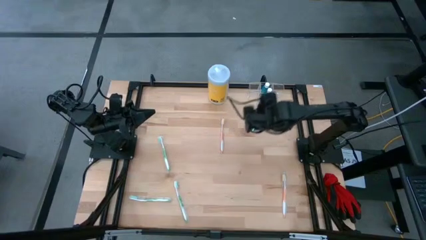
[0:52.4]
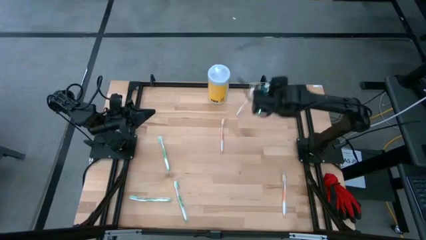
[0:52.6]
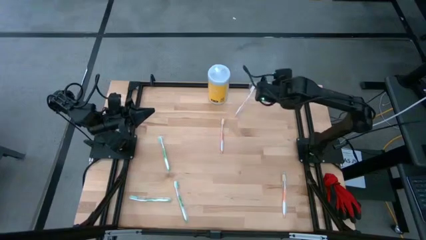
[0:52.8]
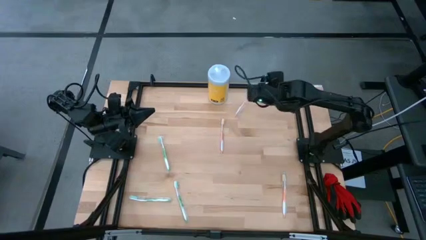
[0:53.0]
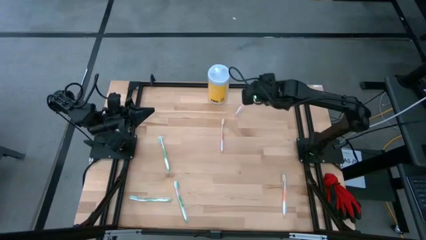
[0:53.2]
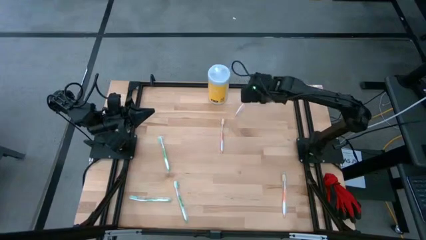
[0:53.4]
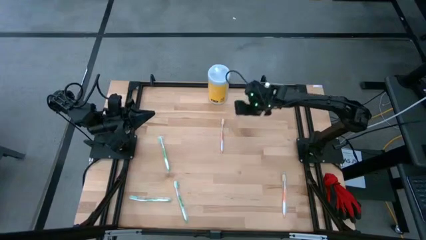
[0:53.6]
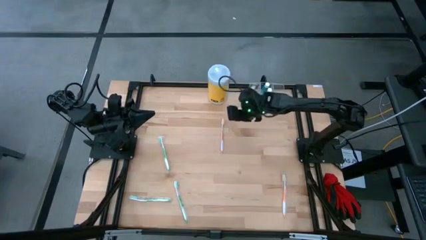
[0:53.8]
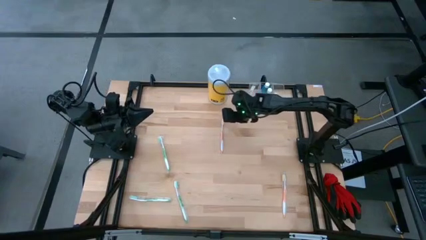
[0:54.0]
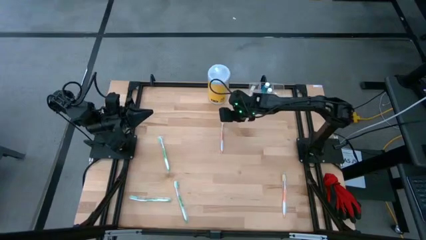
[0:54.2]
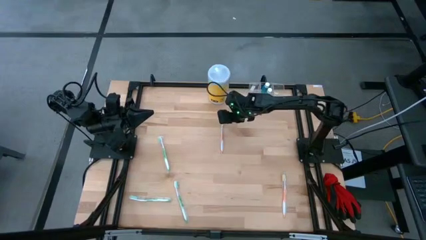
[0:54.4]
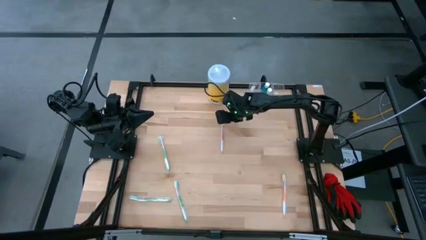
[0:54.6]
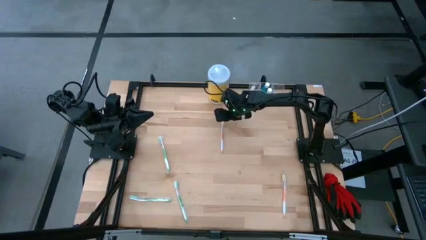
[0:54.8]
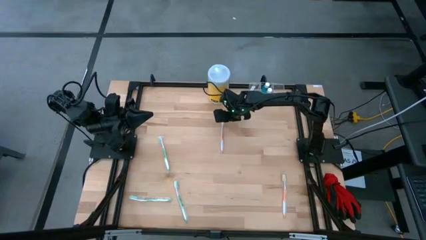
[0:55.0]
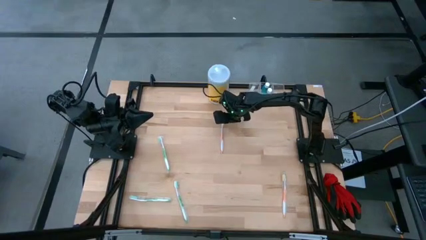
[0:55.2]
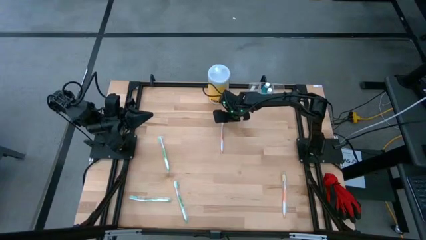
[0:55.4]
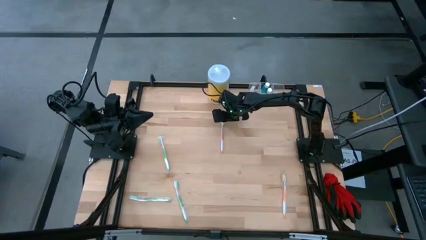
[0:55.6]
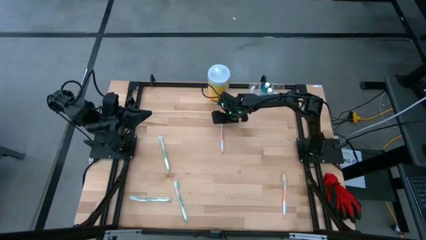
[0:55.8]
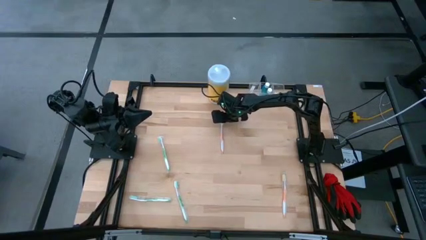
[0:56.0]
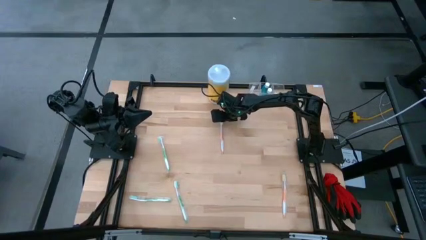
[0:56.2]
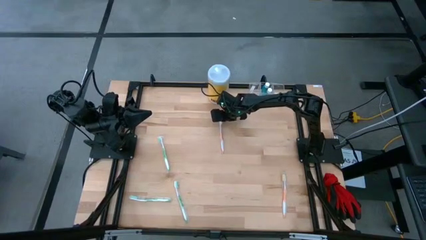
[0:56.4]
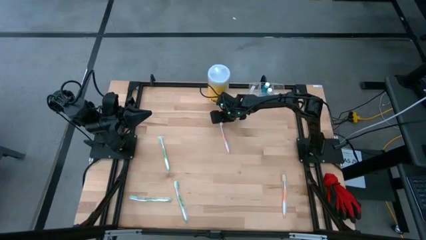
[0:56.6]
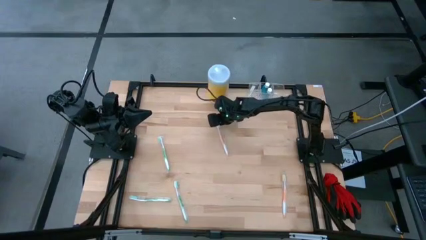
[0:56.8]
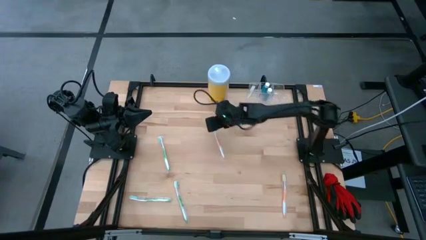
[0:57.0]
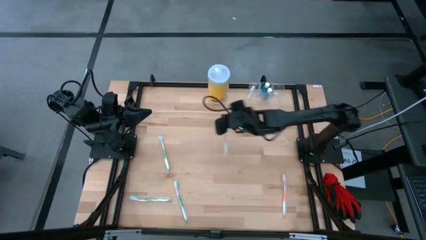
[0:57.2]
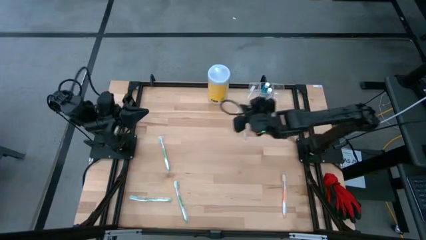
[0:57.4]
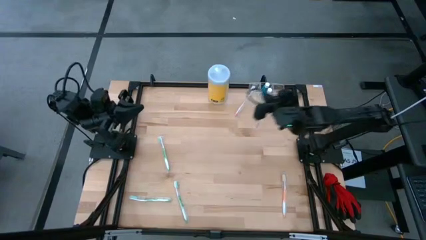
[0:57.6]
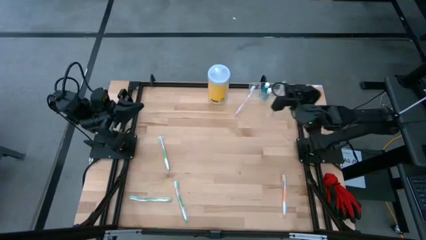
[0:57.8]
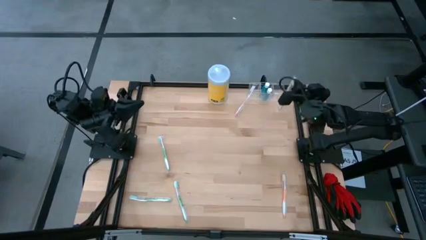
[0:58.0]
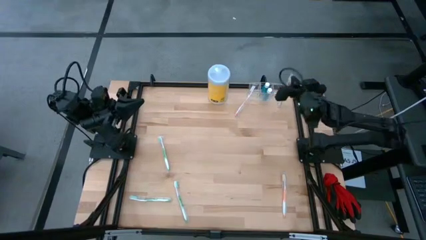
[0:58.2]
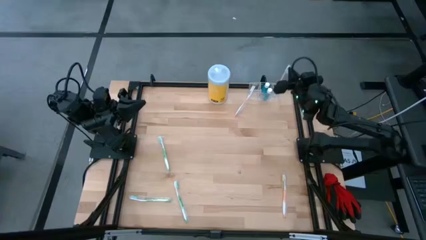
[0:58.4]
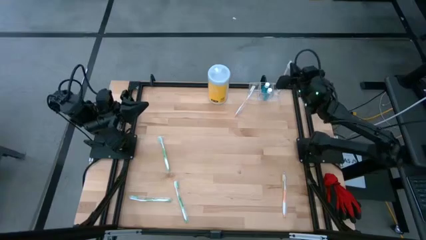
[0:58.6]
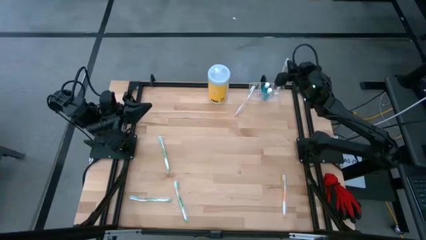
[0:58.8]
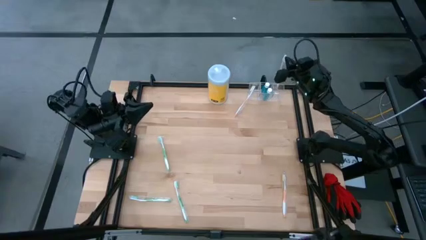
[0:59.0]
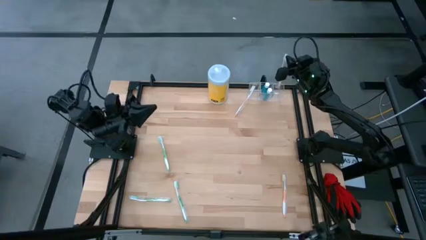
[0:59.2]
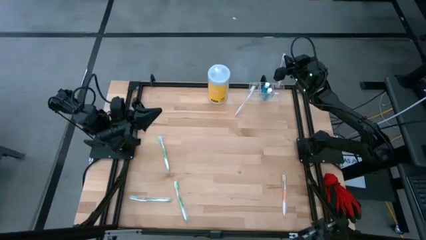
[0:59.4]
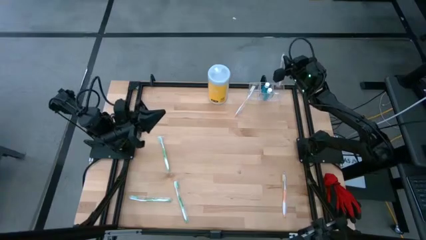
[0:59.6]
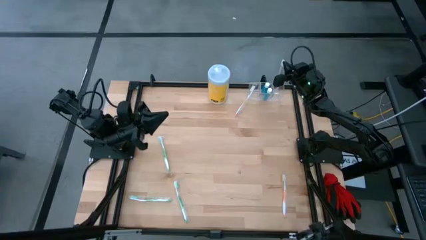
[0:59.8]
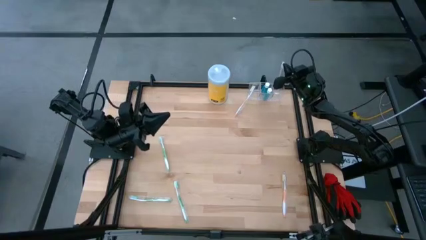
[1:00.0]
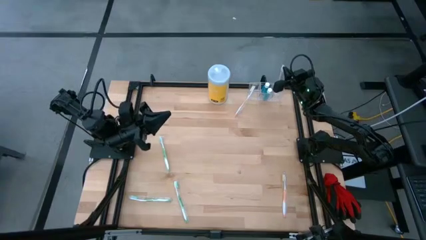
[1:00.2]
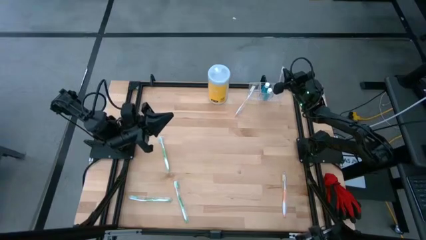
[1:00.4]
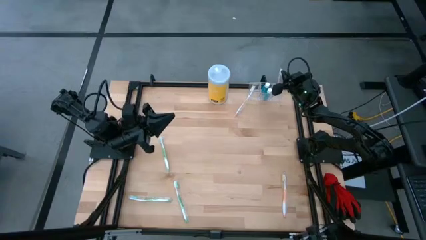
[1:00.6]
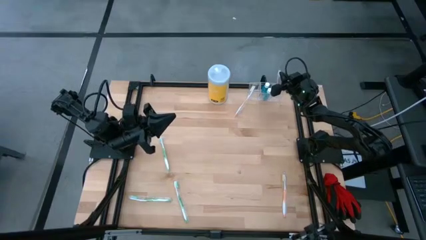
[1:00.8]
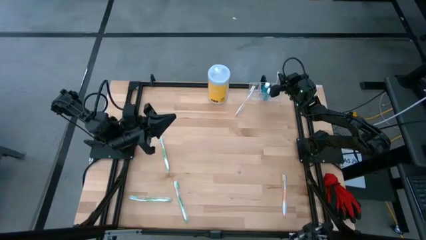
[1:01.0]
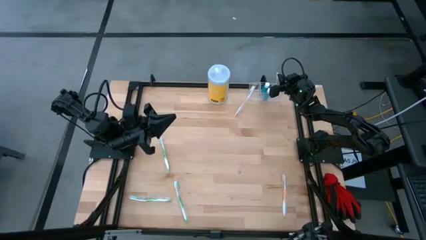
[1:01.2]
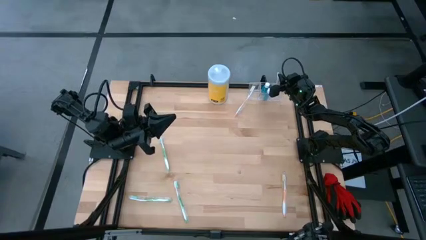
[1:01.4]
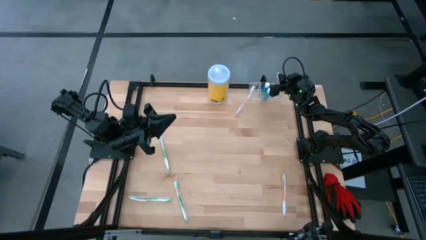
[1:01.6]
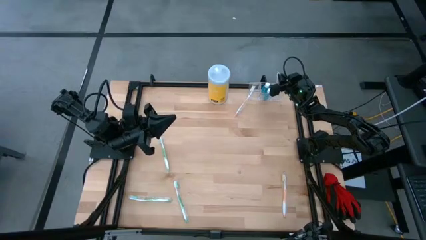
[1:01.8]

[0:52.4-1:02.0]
Task: Pick & Place toothbrushing station
Put the left orange toothbrush into the transparent organizer

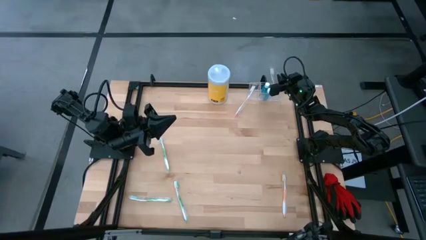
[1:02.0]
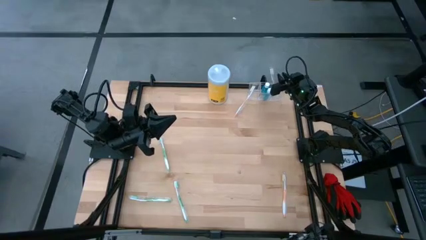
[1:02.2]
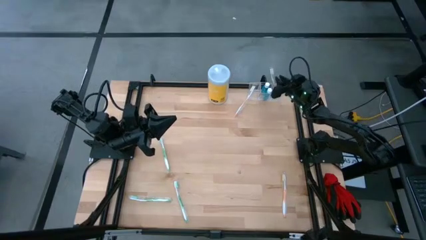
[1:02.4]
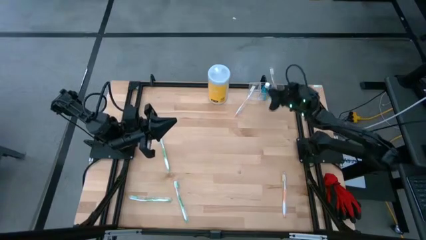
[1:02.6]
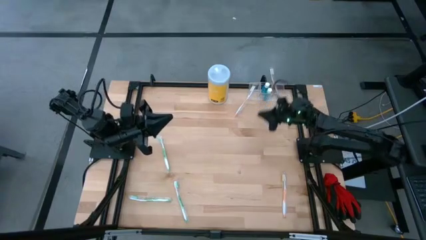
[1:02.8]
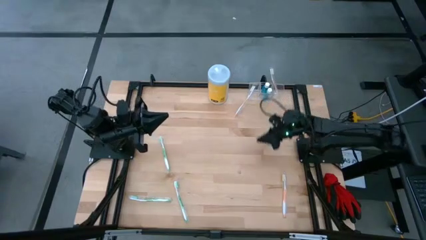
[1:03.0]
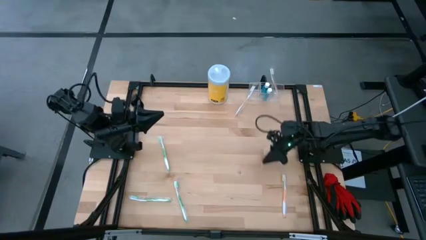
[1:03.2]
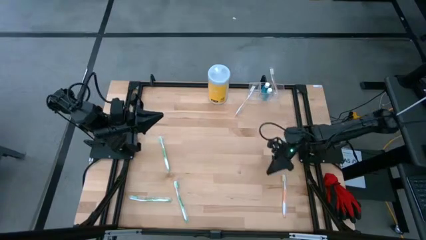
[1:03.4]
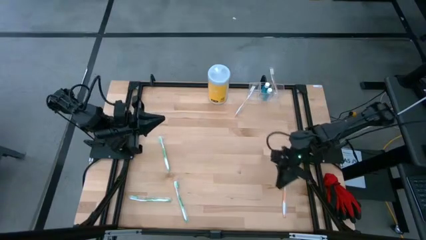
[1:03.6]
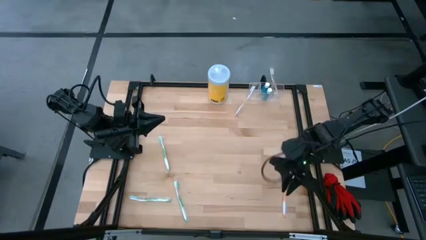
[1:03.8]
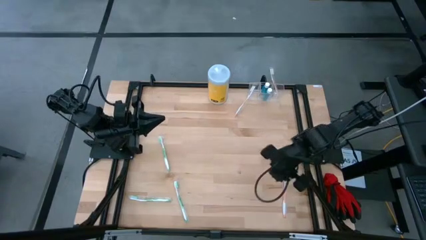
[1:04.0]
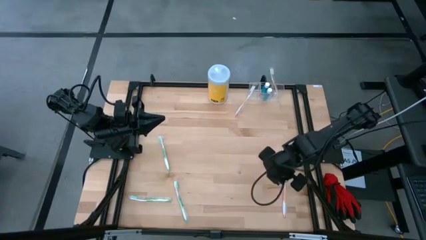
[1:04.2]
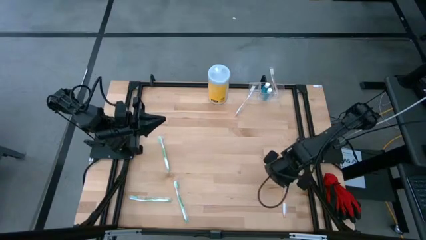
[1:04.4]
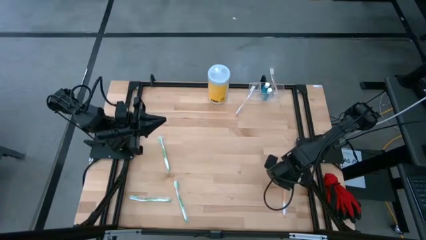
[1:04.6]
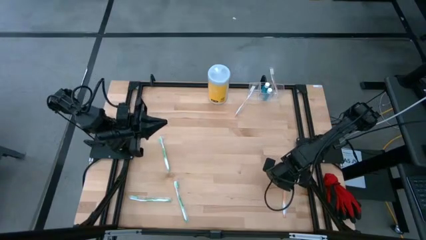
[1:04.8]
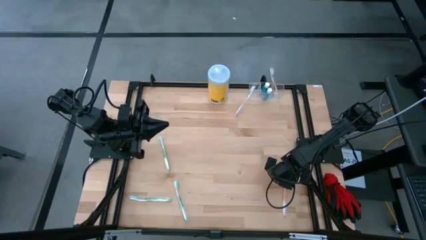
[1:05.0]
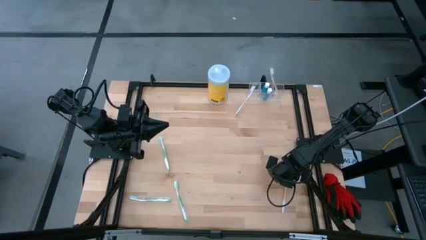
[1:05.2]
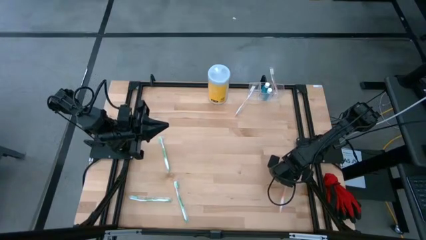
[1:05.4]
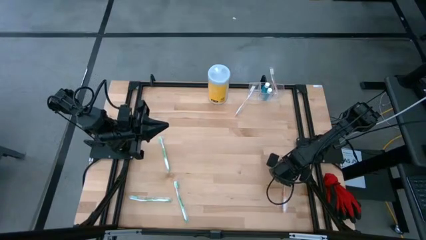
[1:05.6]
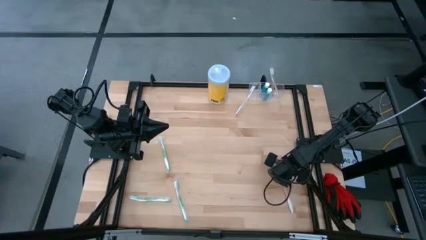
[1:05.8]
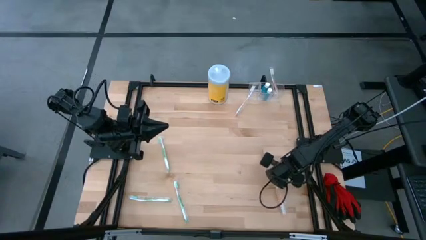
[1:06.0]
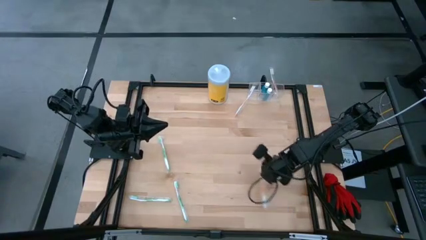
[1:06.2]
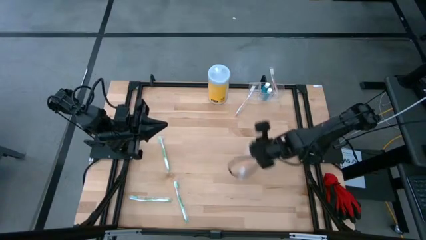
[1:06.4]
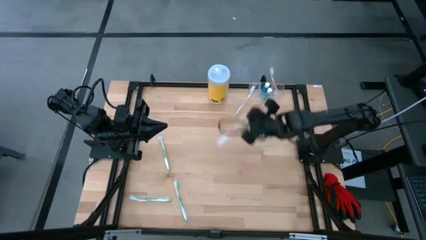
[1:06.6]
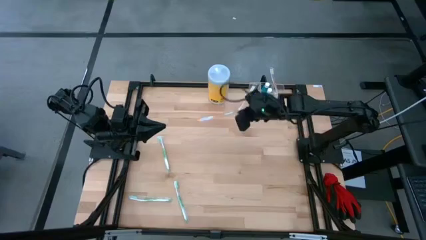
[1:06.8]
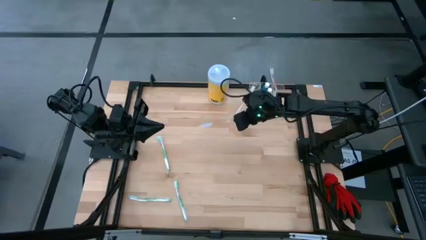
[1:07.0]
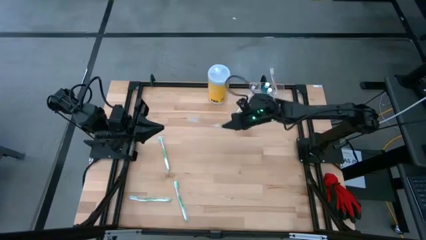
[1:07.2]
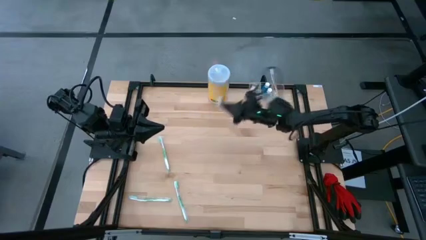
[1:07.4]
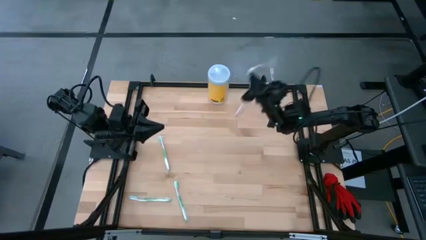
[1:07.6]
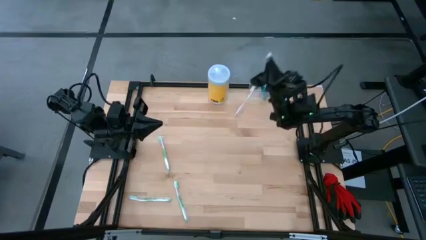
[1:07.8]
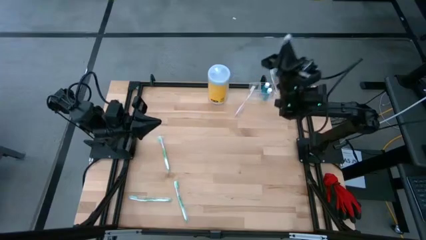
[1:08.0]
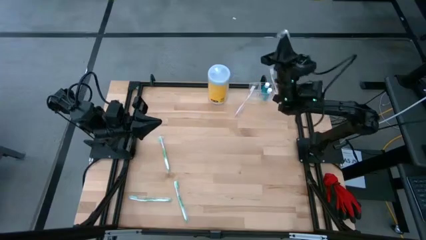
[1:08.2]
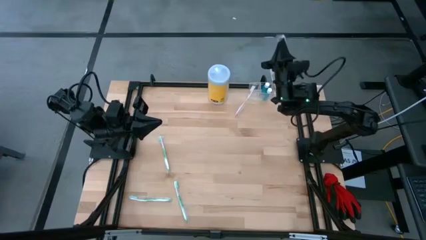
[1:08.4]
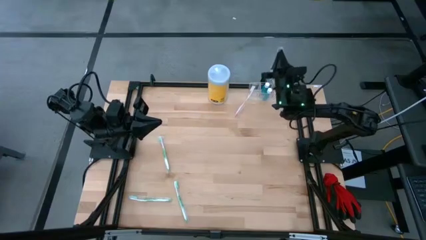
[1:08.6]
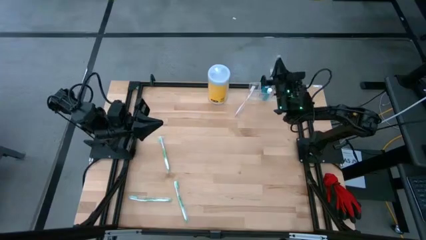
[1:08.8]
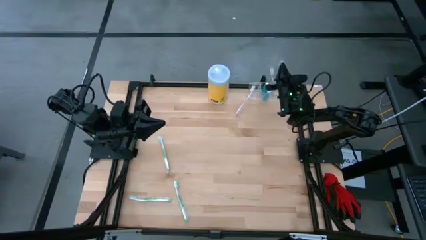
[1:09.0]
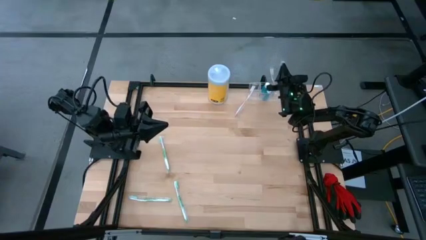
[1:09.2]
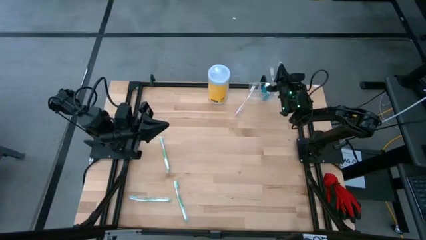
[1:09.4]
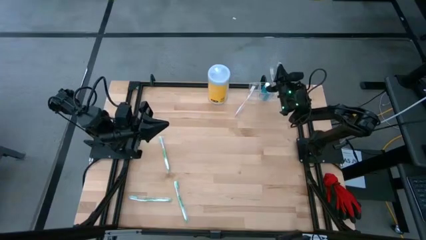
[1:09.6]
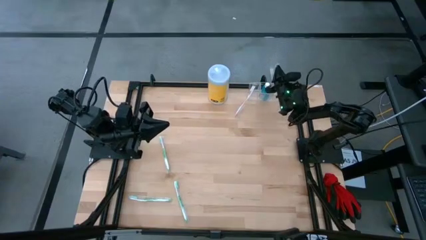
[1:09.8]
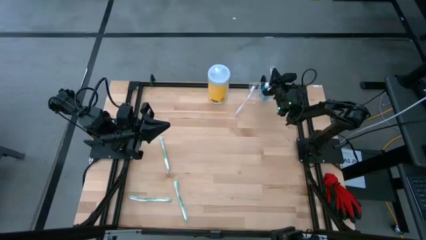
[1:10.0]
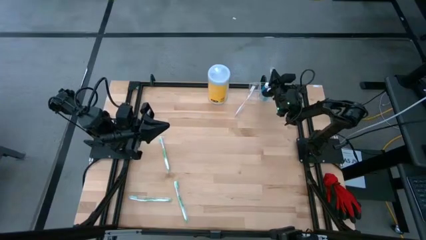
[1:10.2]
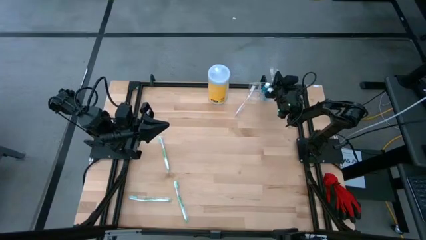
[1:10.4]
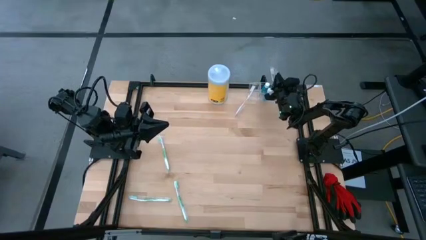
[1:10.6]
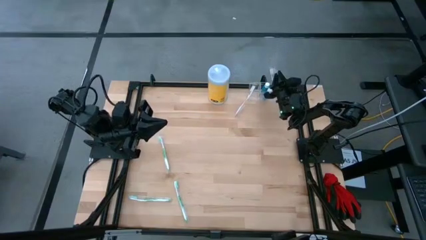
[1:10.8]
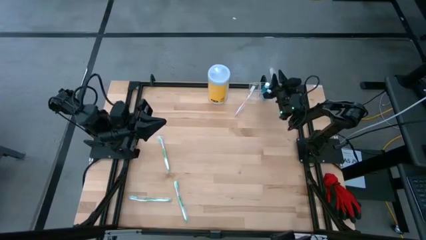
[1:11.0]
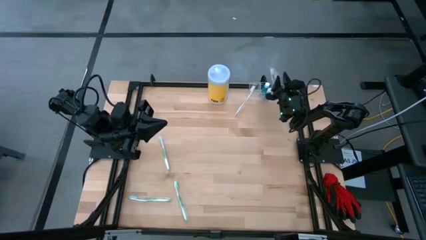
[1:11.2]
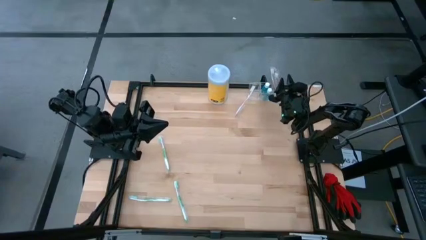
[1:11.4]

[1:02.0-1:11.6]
Put the bottom orange toothbrush into the transparent organizer
